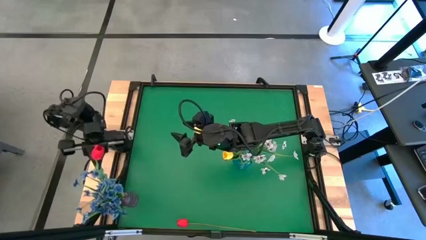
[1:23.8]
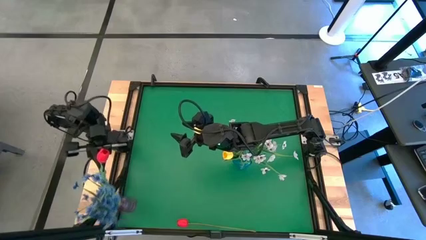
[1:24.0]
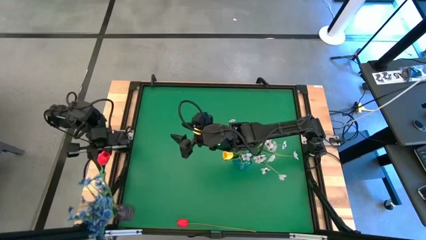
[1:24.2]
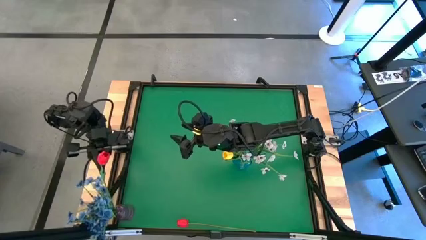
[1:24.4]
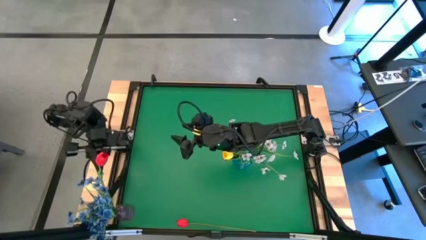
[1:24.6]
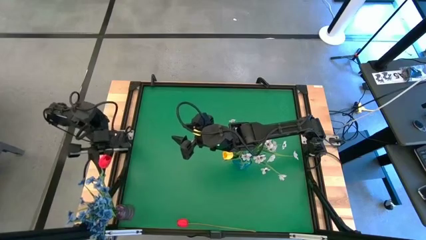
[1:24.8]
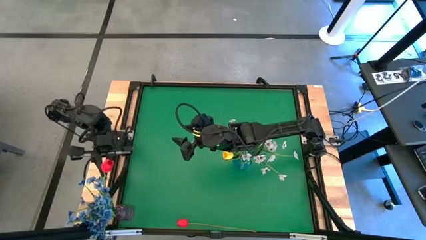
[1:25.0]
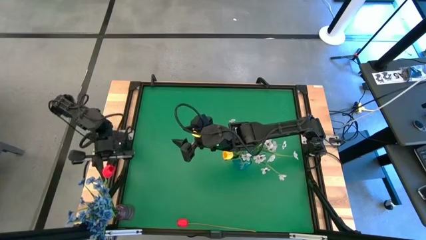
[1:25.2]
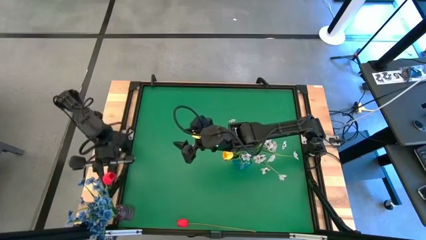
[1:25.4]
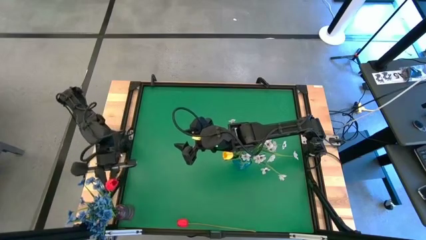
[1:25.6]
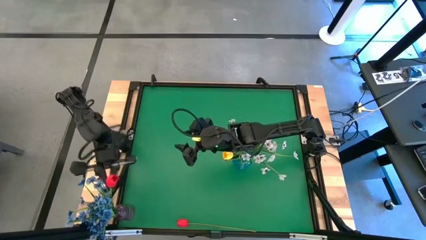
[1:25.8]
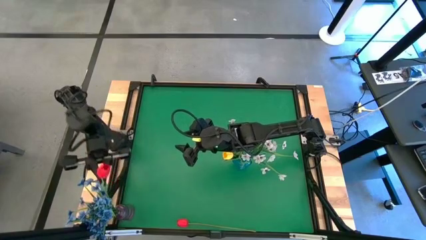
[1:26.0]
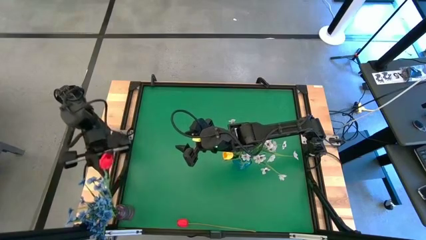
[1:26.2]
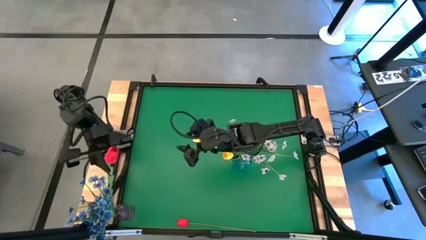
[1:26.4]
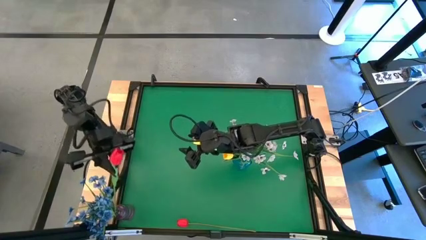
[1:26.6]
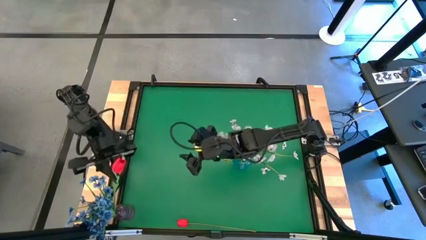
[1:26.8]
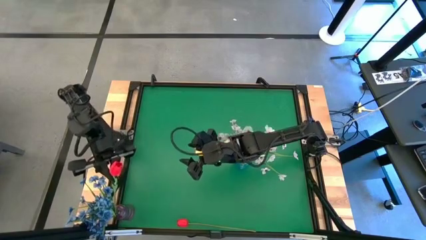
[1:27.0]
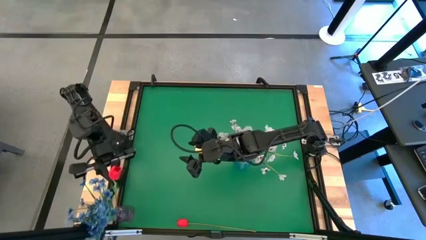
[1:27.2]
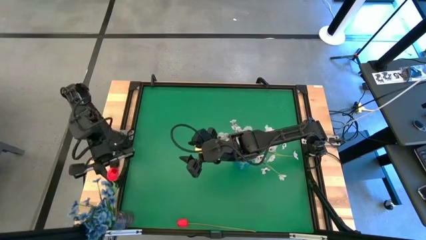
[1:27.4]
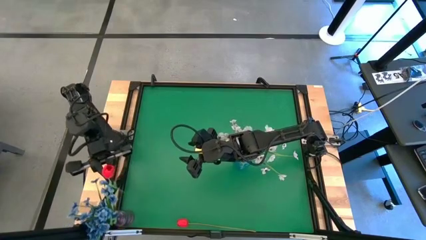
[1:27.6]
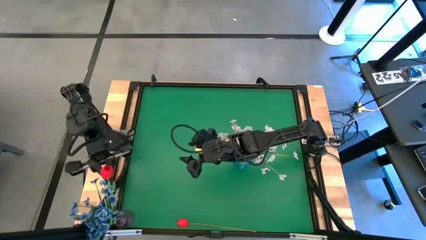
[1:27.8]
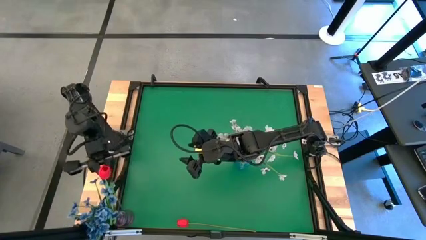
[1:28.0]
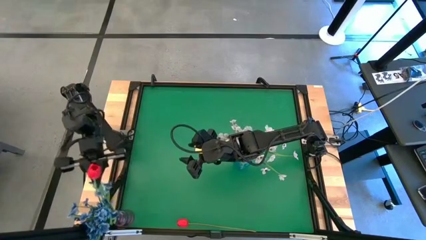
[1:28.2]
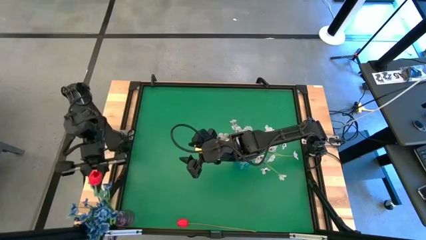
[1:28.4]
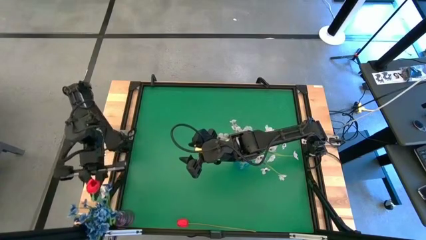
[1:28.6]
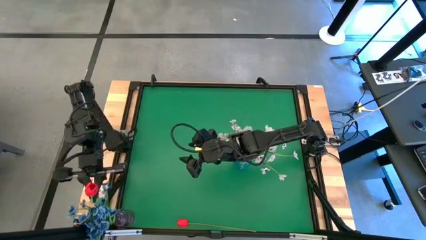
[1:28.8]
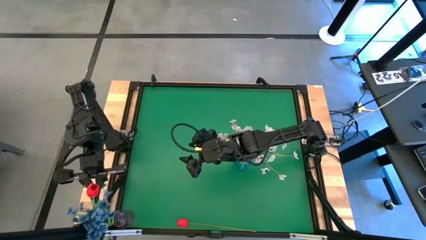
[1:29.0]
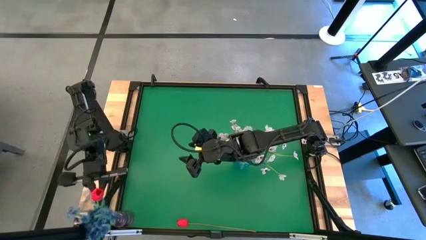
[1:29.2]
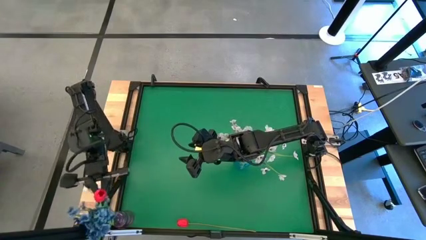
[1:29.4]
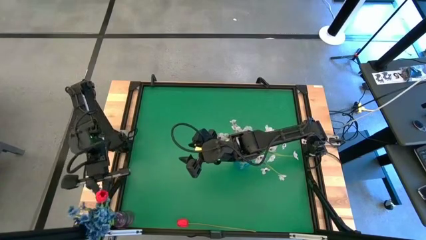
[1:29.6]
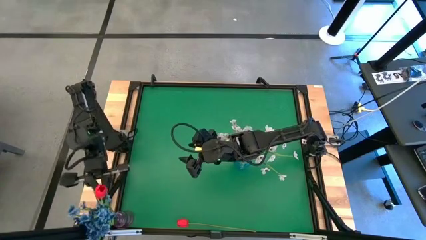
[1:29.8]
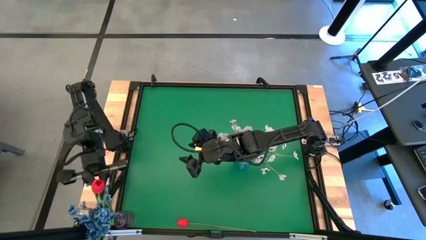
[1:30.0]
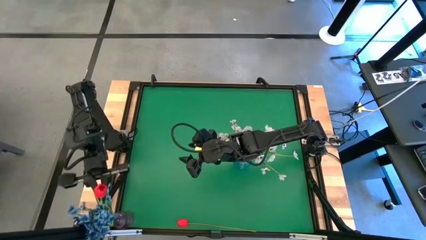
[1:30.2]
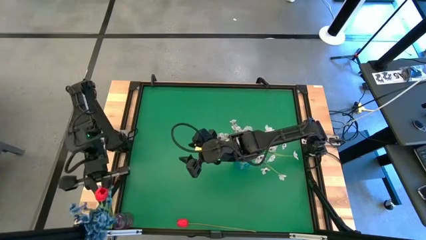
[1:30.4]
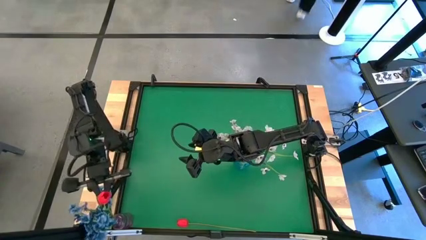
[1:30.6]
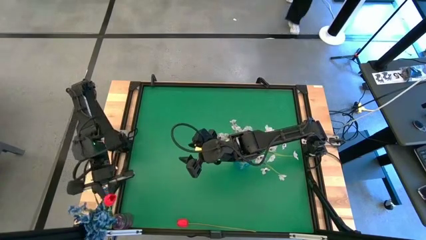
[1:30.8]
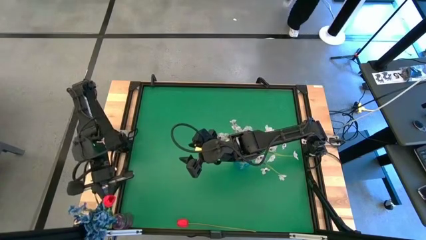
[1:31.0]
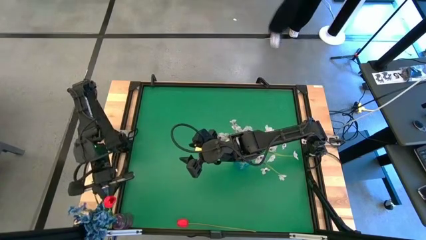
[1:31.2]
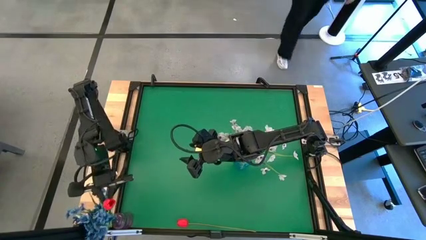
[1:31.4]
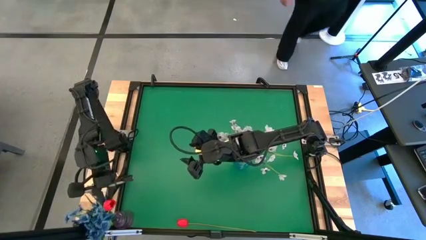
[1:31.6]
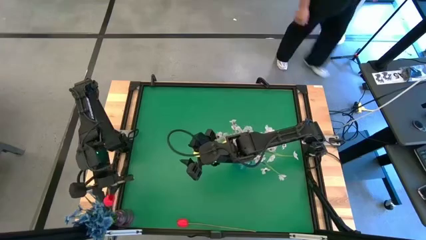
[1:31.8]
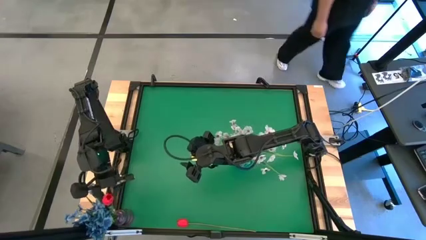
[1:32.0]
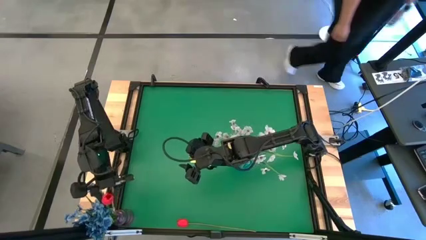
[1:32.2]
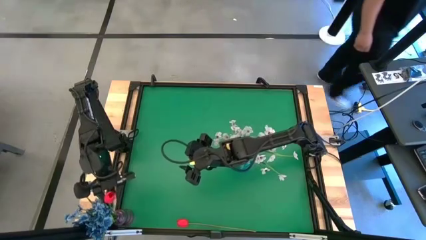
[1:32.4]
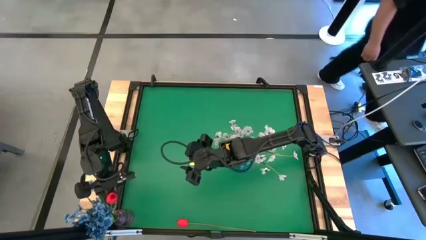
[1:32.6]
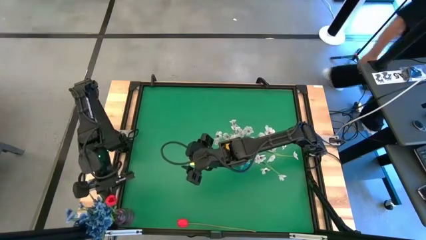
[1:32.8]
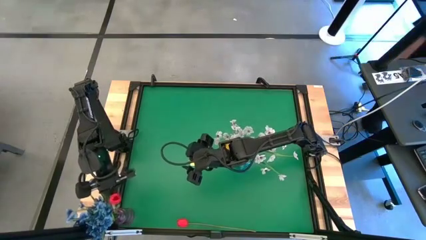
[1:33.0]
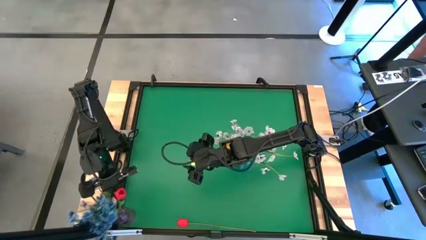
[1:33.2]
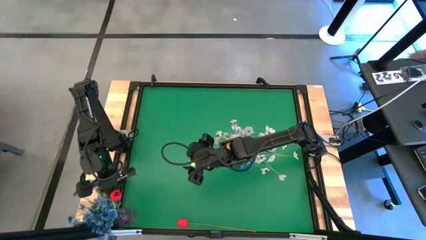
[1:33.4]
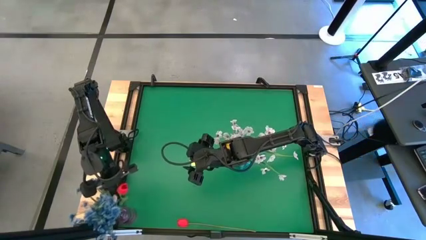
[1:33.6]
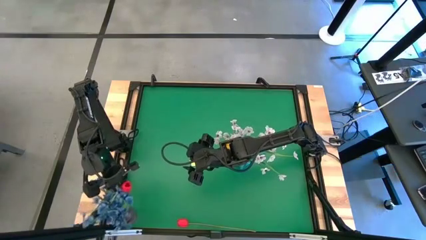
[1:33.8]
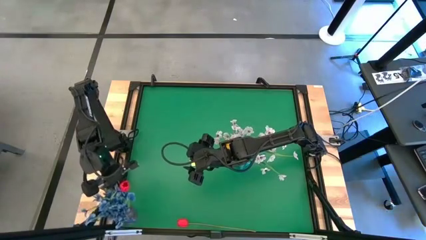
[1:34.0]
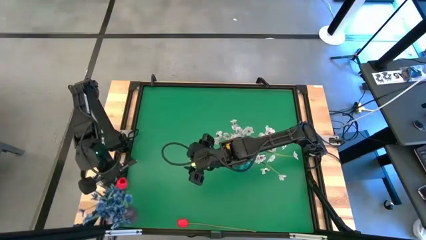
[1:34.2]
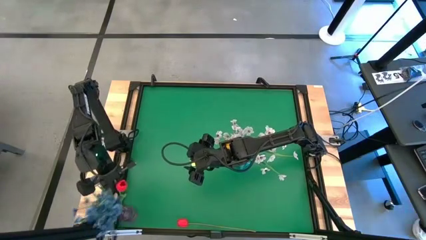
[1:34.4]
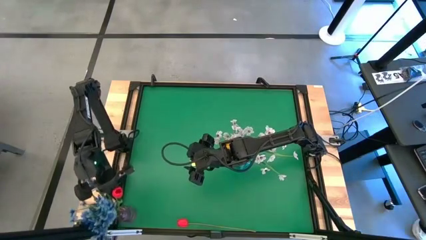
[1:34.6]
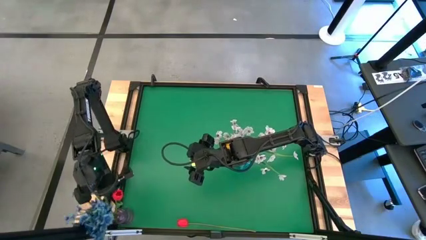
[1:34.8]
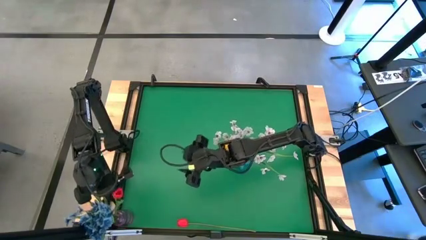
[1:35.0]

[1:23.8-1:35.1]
Task: Sort flowers into vase by color
Put the top red tulip into the violet vase

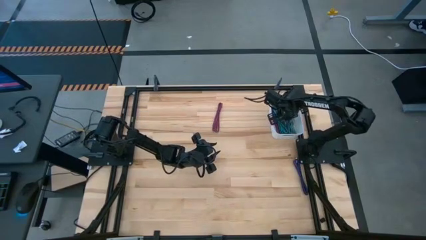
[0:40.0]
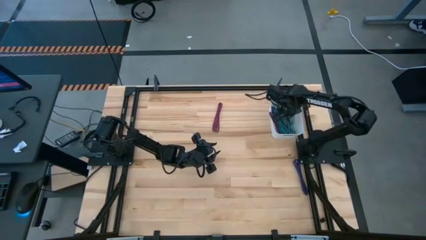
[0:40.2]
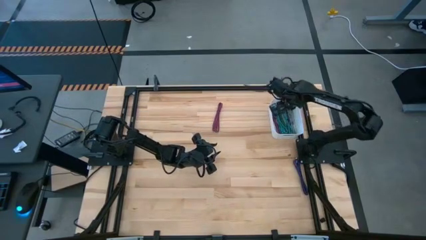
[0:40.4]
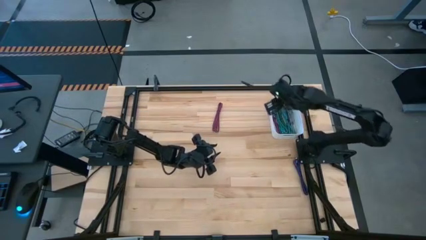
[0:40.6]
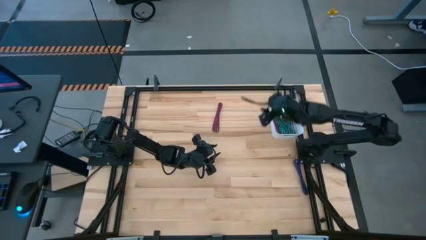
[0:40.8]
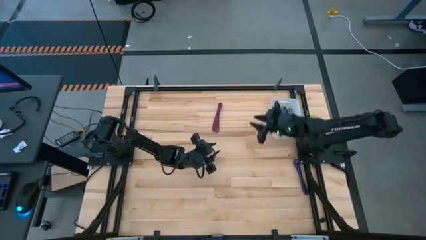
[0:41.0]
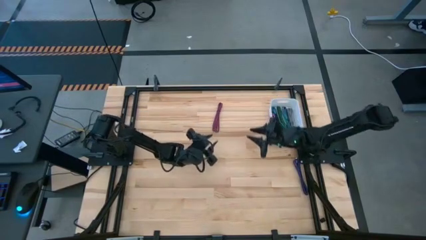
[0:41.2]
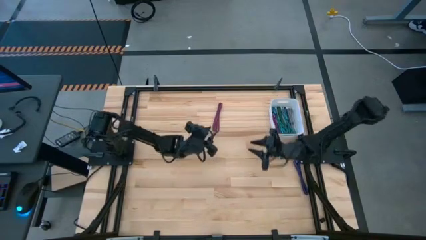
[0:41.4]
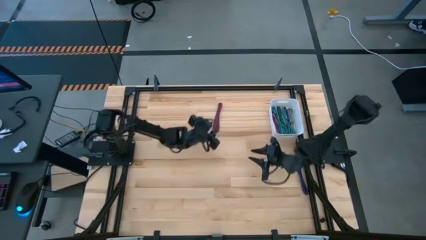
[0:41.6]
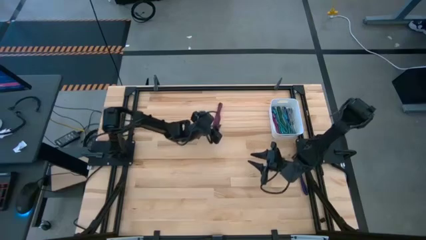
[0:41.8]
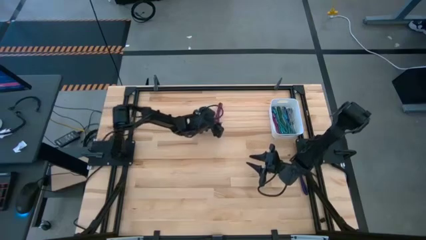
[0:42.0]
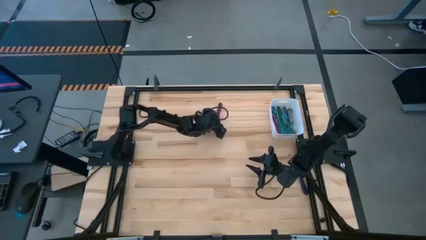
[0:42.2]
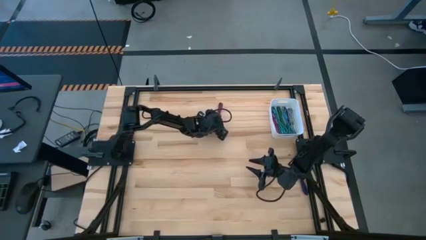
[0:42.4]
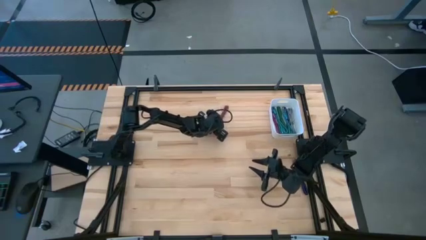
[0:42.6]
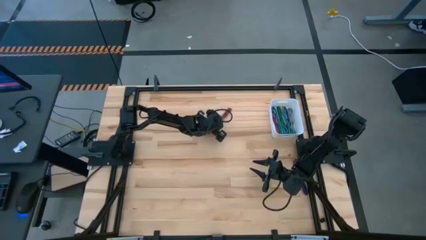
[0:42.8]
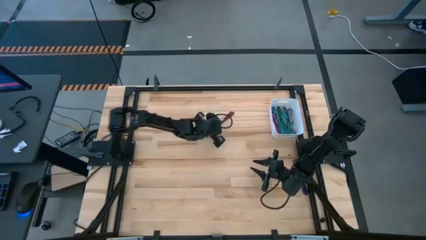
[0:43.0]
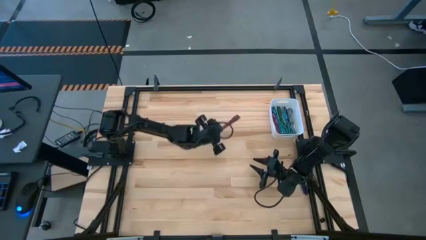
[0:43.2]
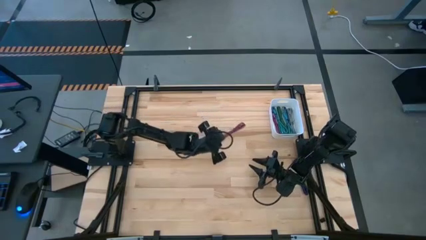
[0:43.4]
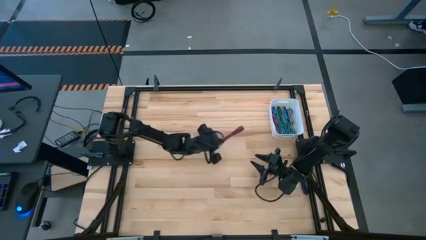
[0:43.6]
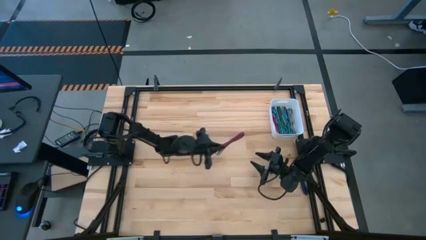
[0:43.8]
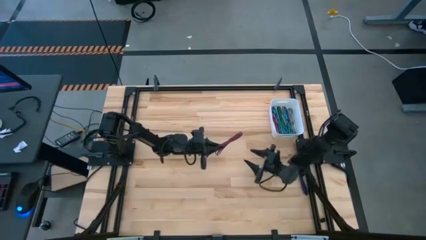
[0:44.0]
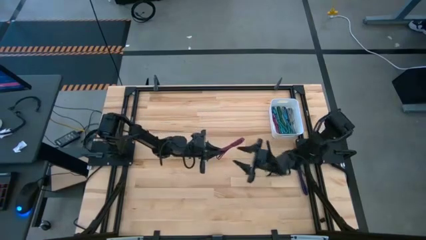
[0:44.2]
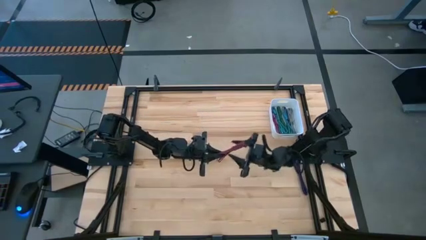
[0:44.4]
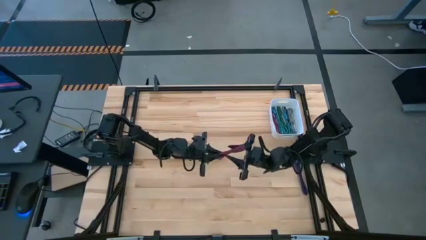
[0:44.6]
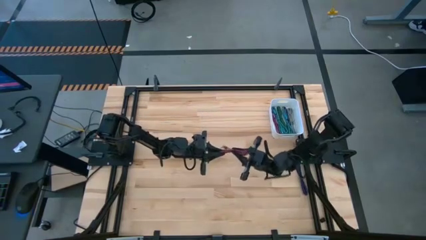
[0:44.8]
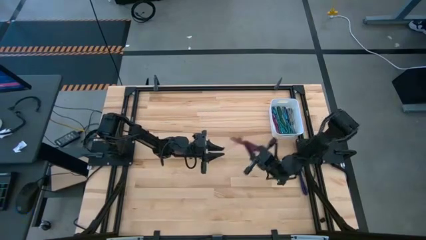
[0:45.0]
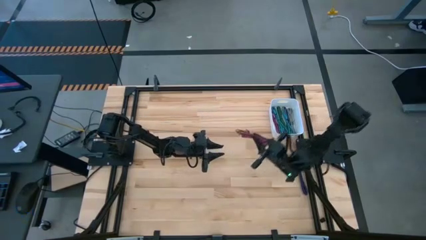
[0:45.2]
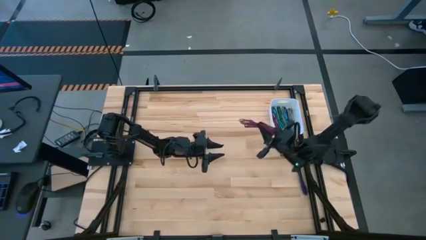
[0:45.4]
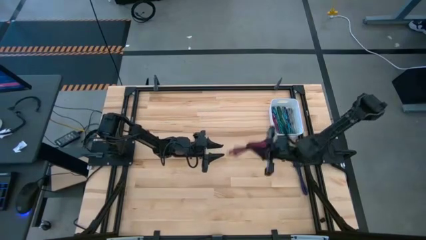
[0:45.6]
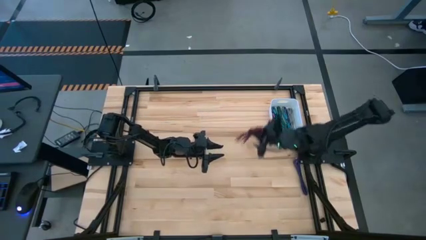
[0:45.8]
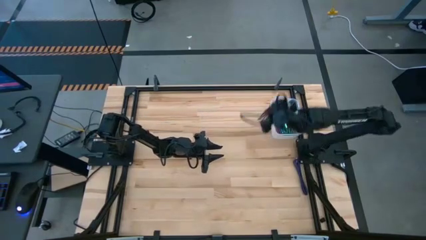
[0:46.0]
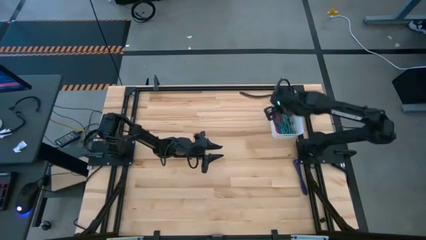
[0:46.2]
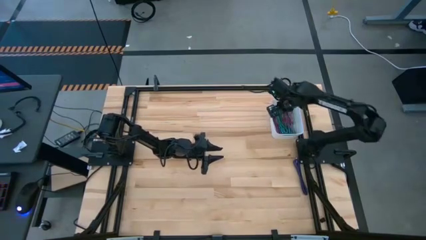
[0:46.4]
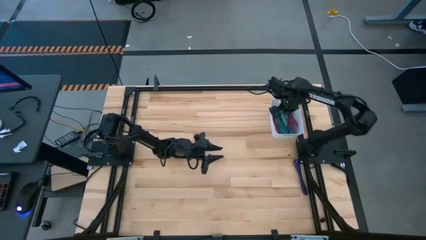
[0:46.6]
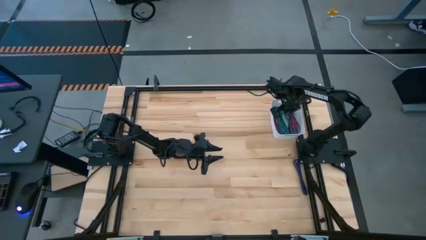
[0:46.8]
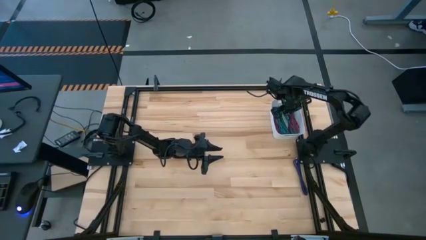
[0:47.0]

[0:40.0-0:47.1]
Task: Pick and place USB-C Cables
Put the pink charger cable into the white bin
